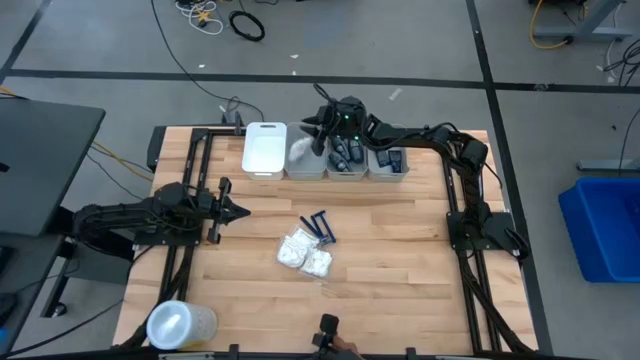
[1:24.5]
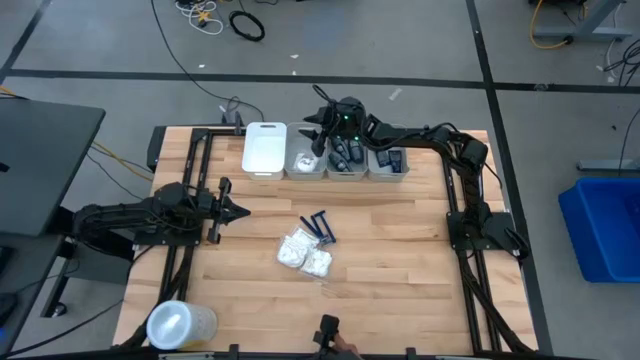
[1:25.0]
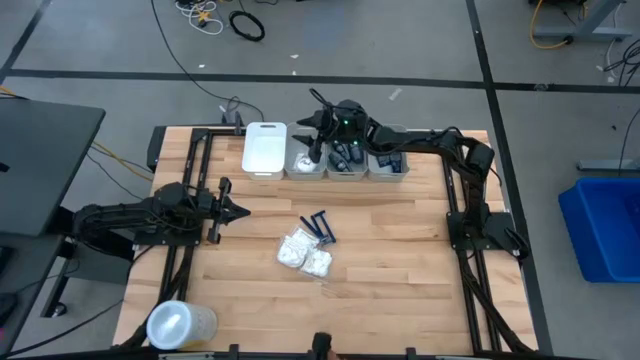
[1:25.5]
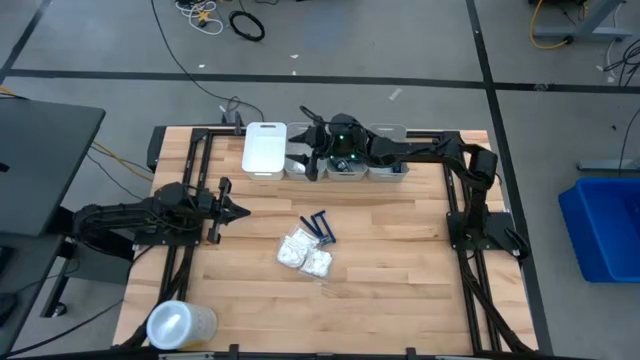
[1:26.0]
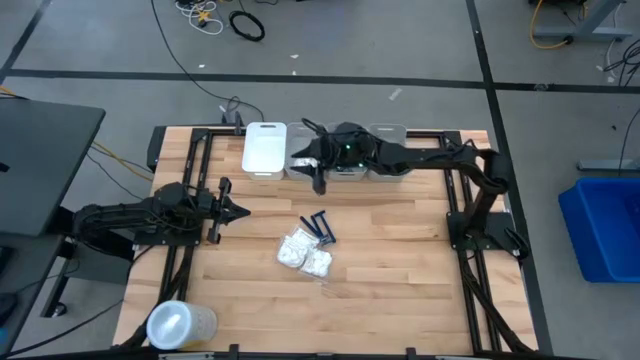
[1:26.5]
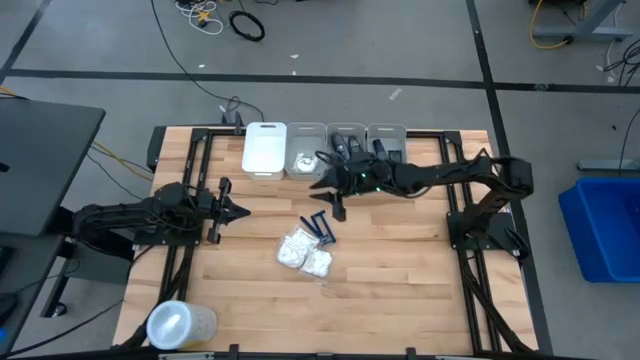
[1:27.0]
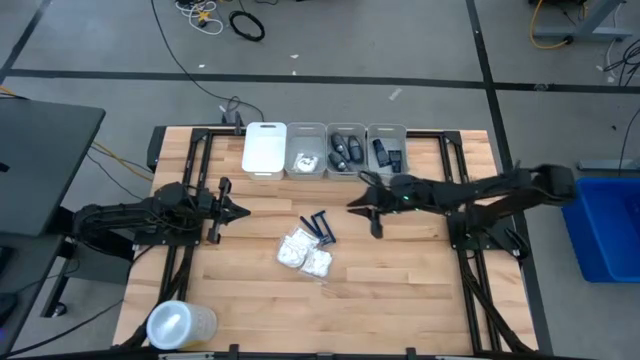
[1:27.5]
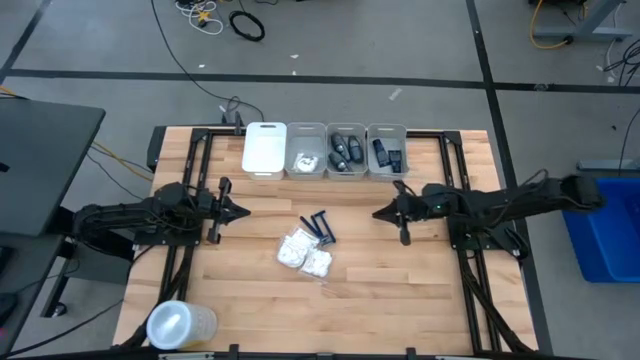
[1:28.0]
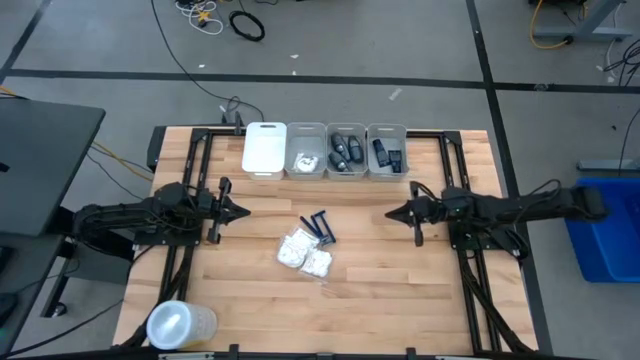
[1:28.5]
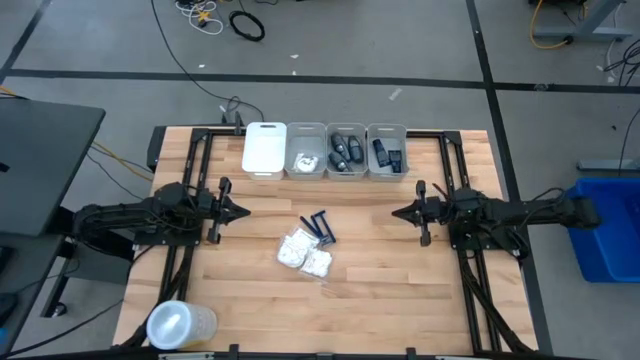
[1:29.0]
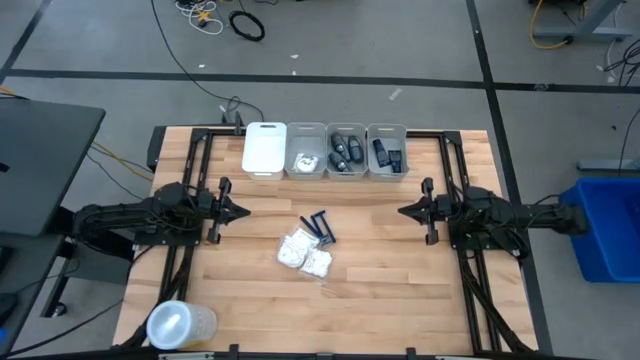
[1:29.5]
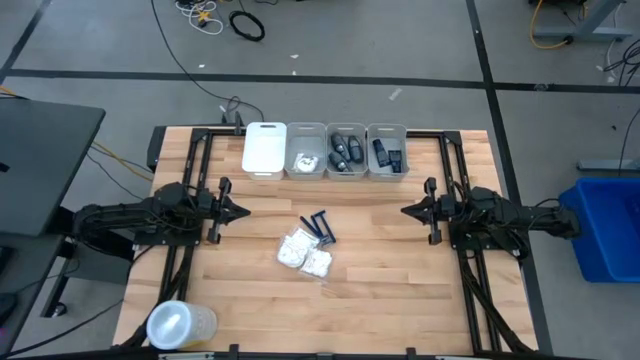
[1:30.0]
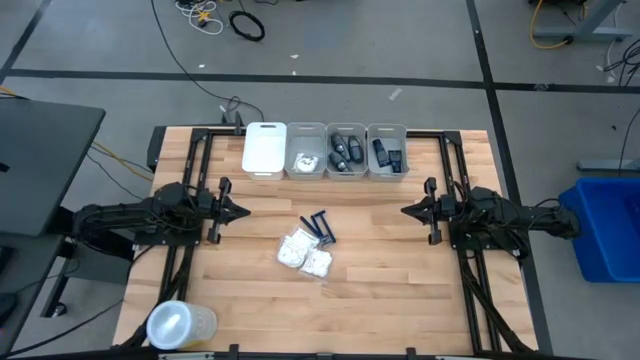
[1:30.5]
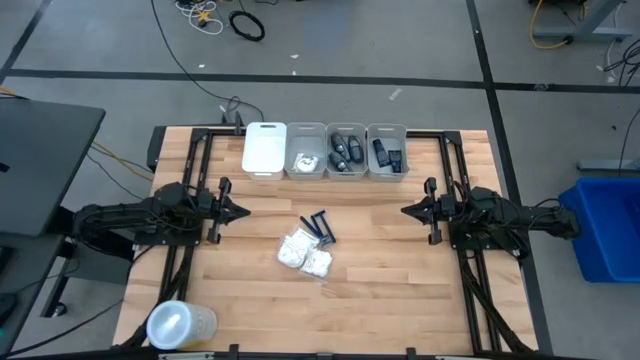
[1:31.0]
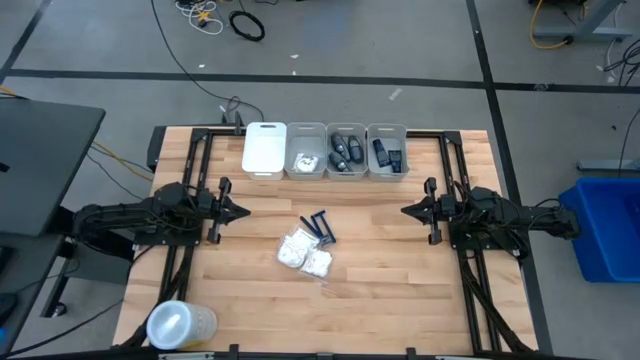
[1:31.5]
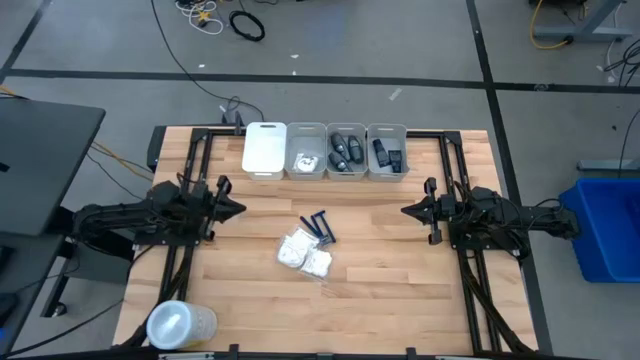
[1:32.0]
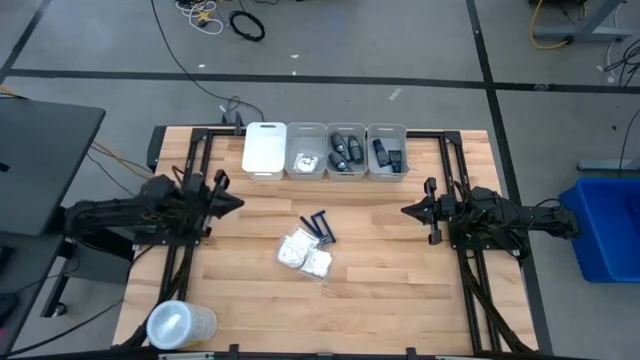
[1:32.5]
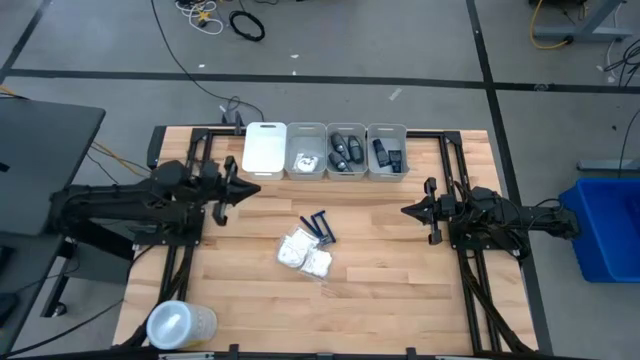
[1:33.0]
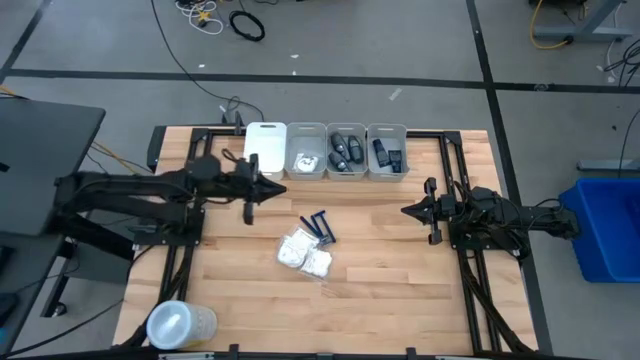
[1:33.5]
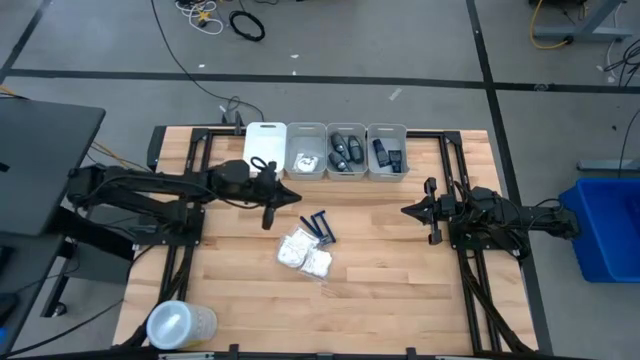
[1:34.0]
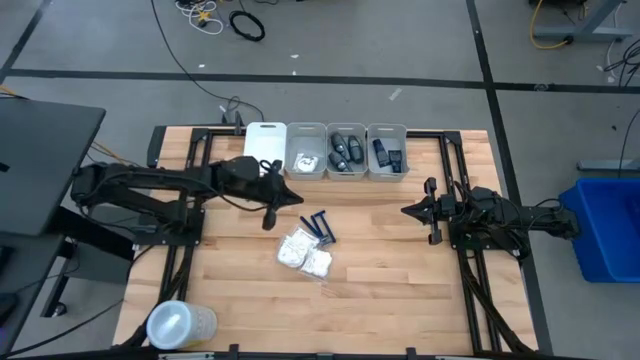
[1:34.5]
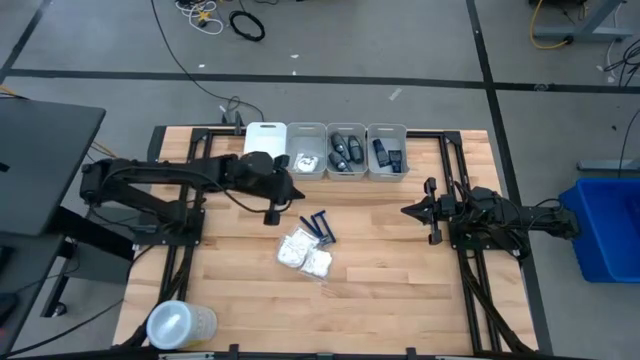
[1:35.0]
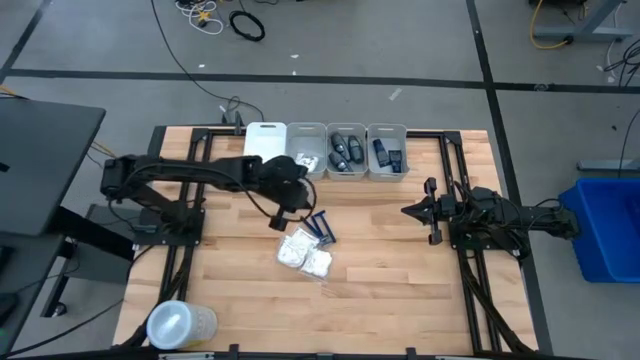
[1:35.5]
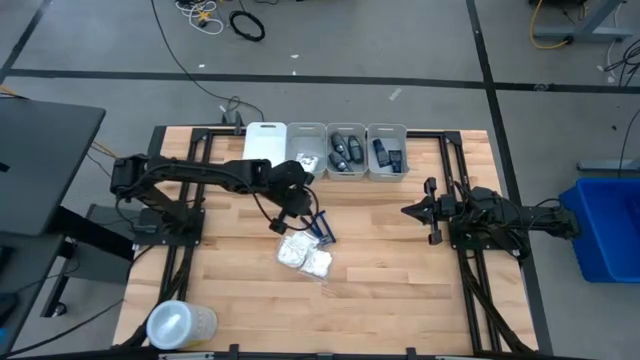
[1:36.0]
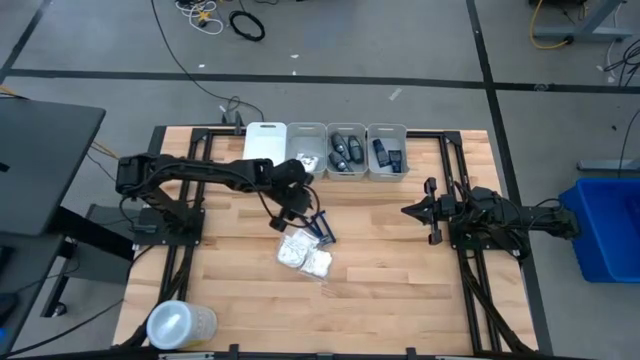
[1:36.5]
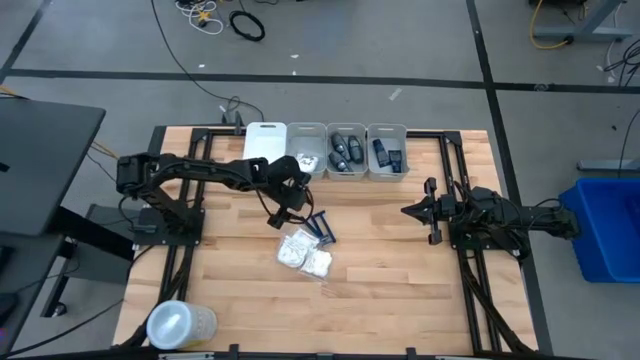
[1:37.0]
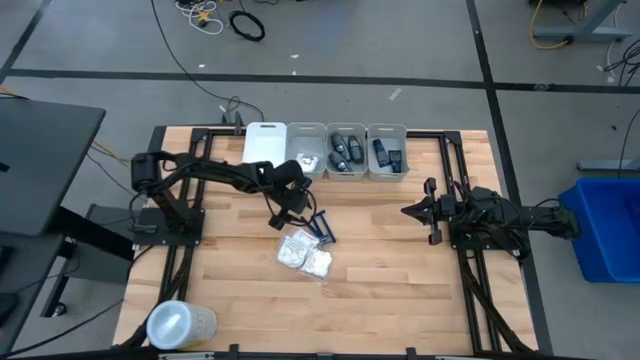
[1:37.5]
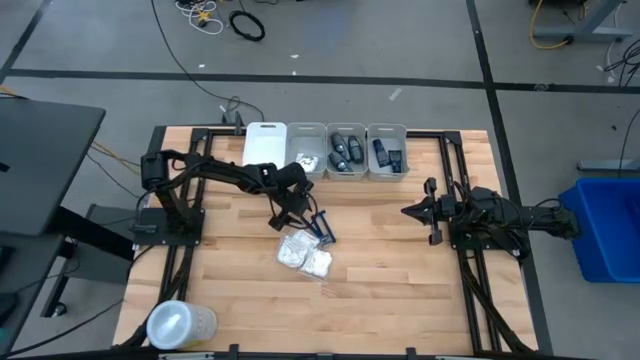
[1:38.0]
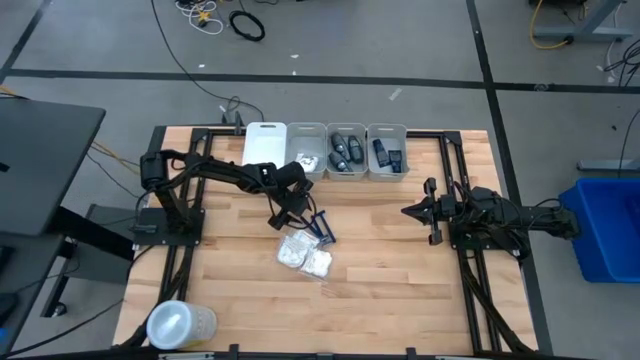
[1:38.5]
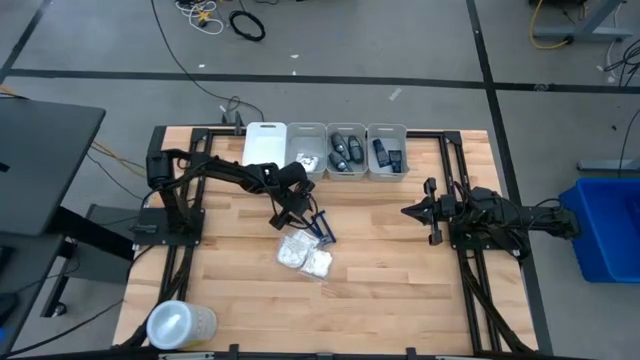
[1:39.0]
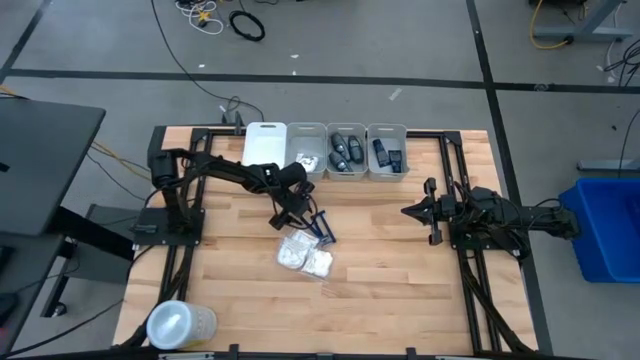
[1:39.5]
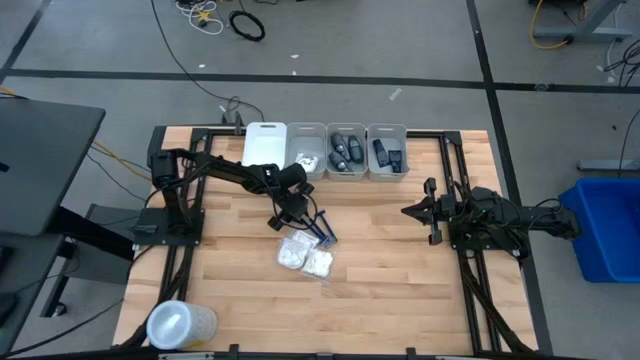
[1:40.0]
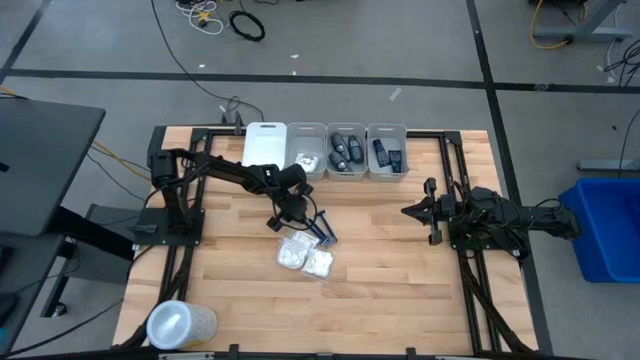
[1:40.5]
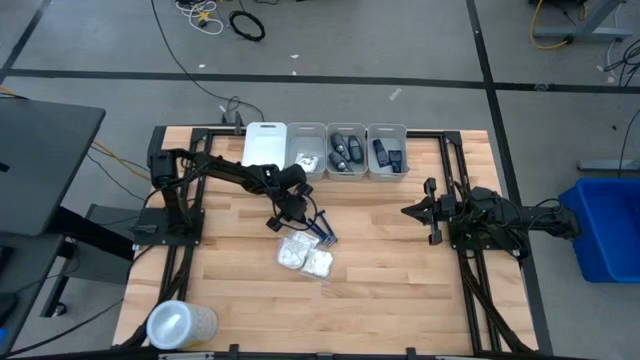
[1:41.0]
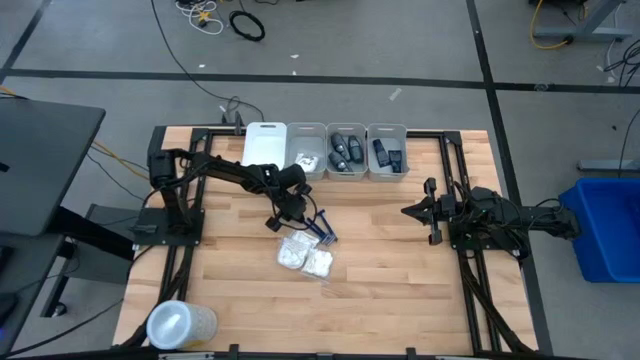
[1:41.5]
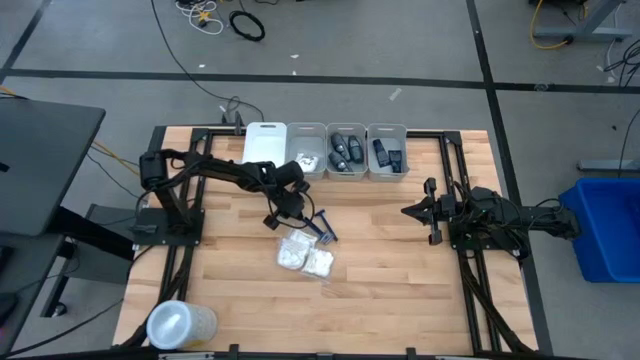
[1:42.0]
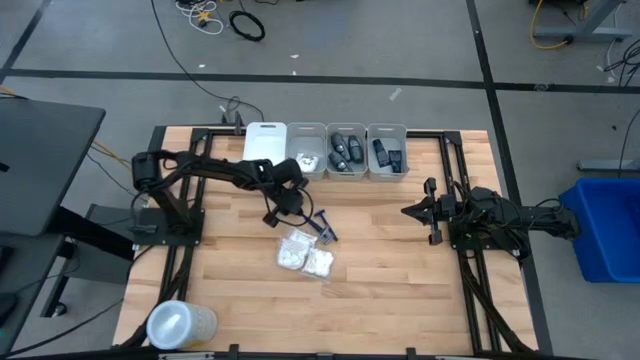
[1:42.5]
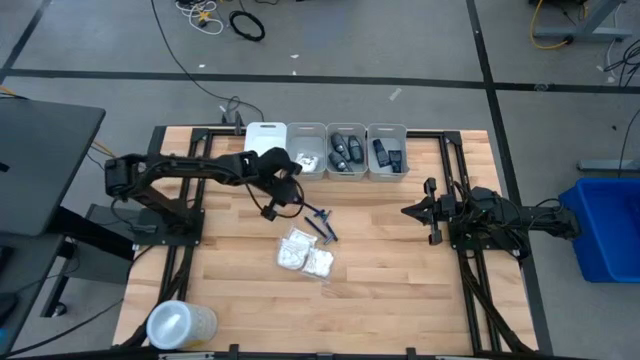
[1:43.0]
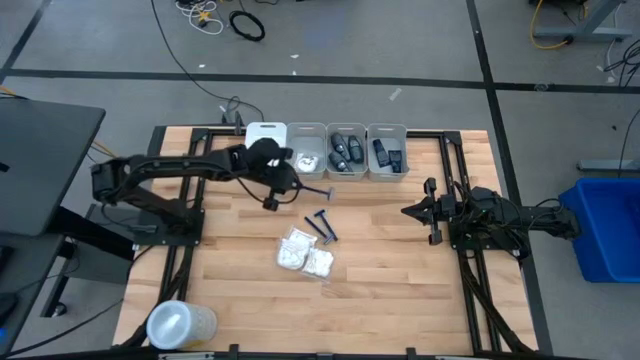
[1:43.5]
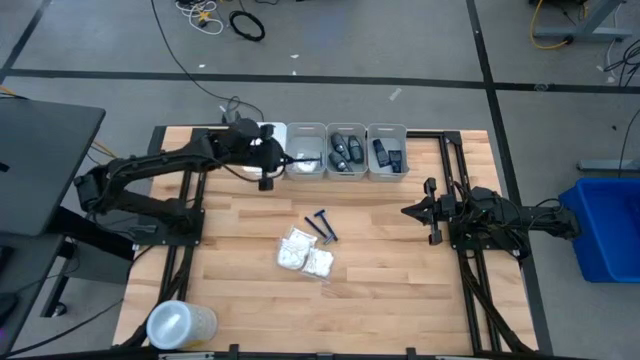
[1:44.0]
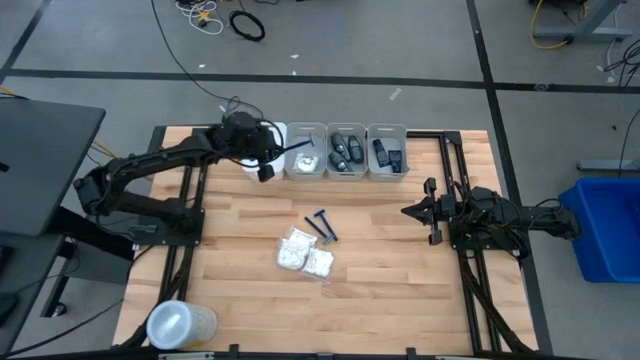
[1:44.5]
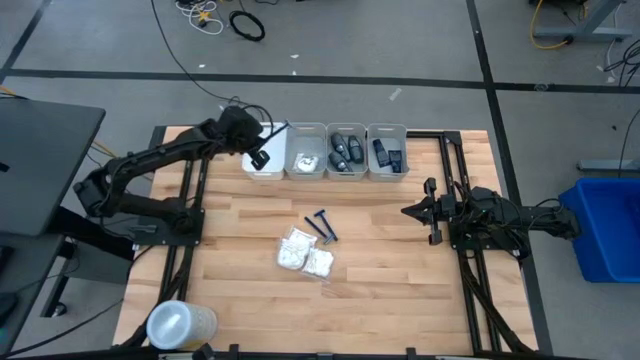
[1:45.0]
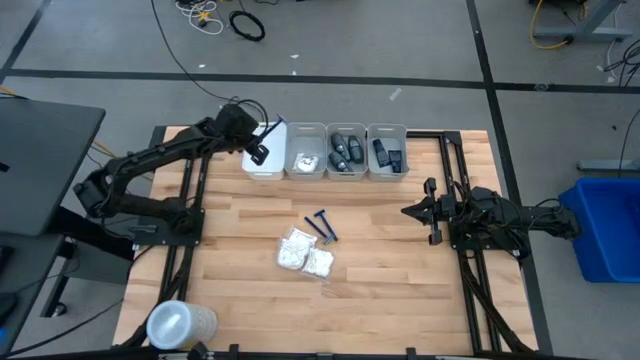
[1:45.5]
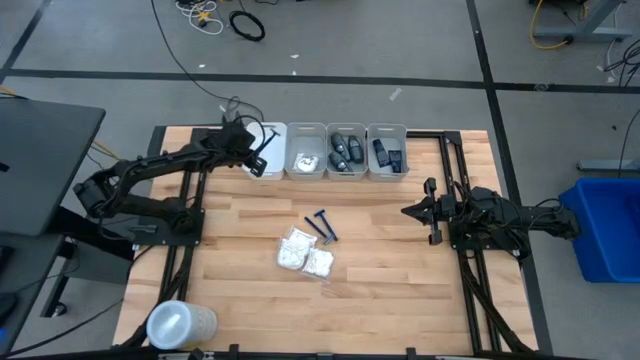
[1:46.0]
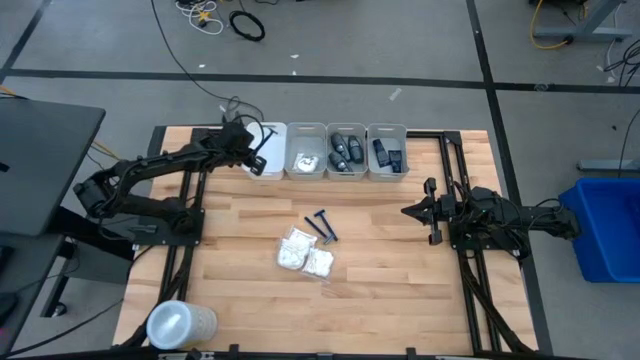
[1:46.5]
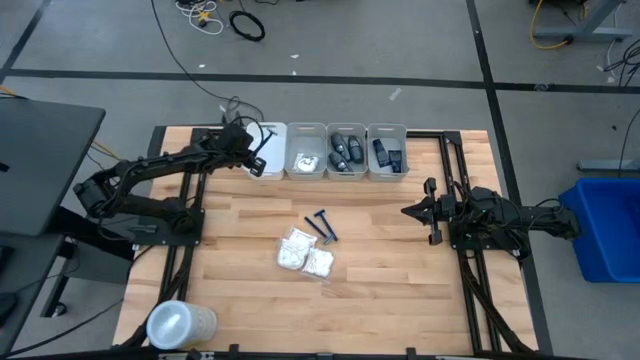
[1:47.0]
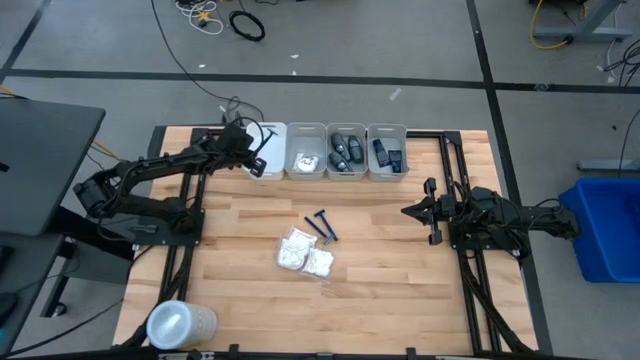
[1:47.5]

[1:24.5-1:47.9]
Task: Pick & Place Travel size toiletries
Put the blue razor into the white bin
